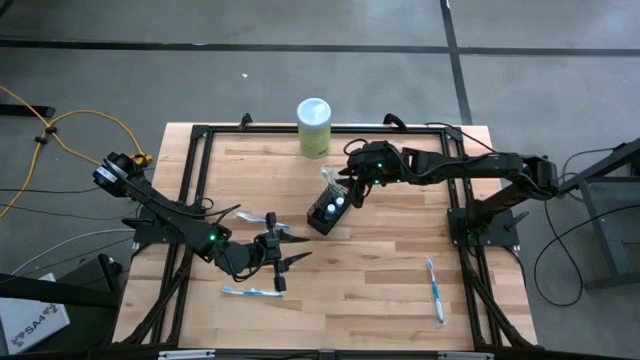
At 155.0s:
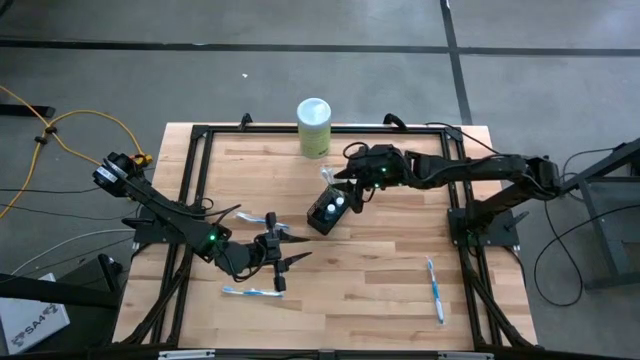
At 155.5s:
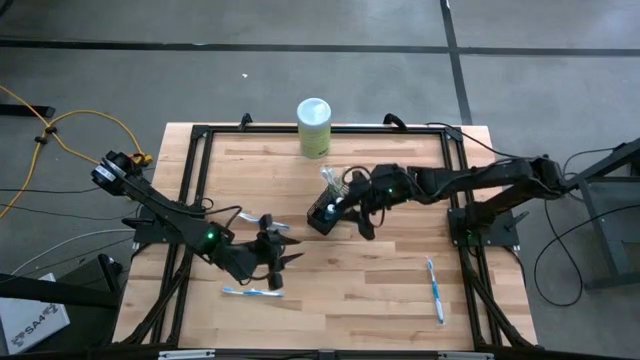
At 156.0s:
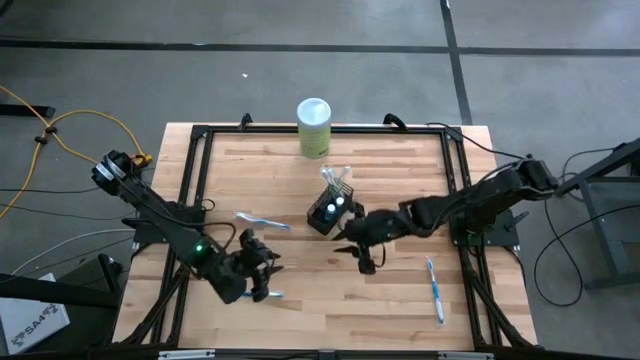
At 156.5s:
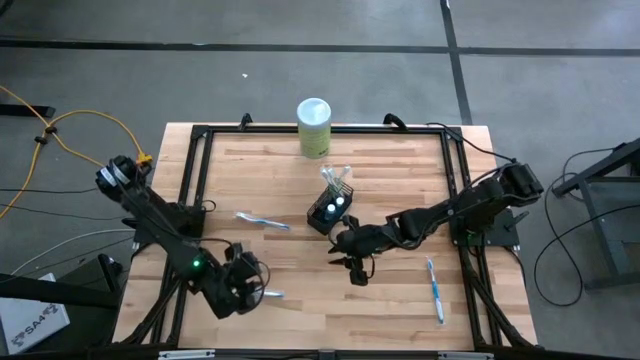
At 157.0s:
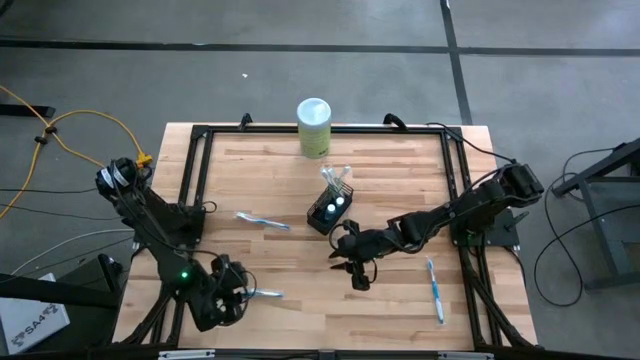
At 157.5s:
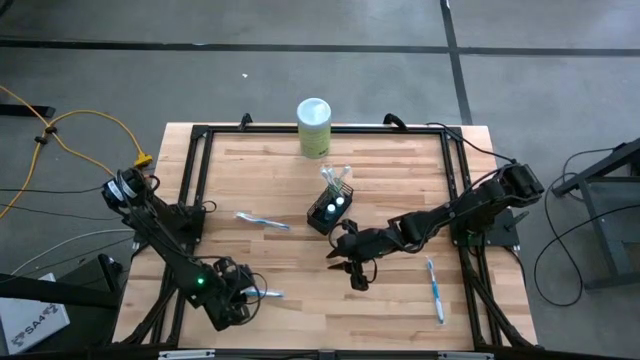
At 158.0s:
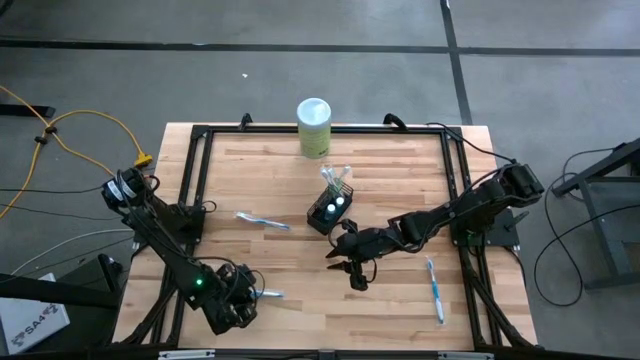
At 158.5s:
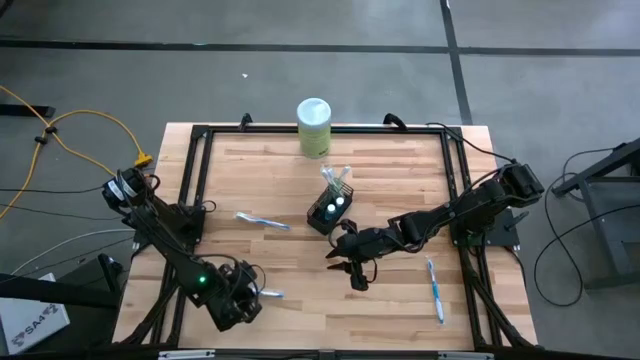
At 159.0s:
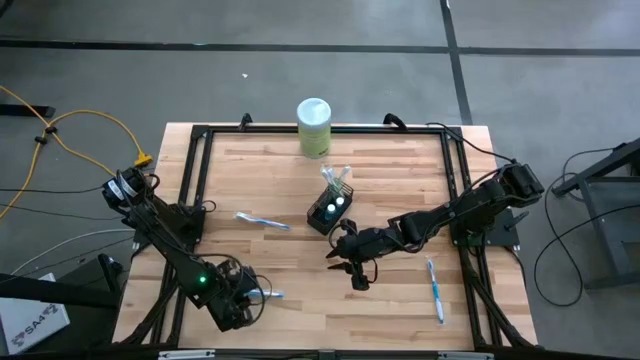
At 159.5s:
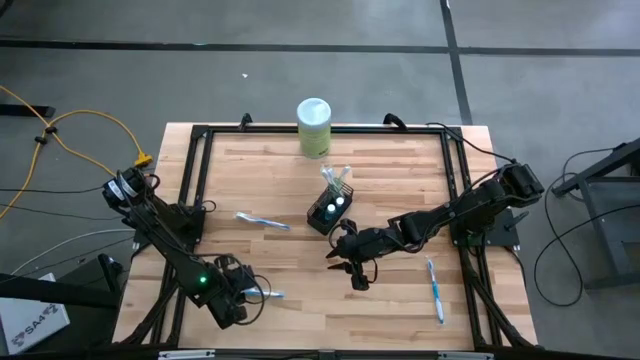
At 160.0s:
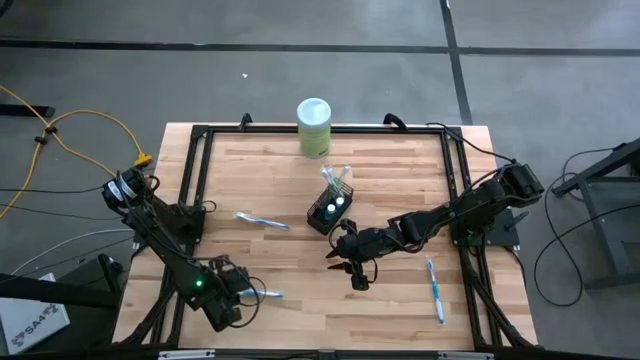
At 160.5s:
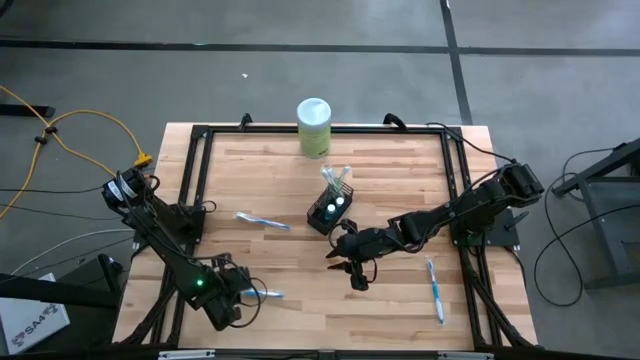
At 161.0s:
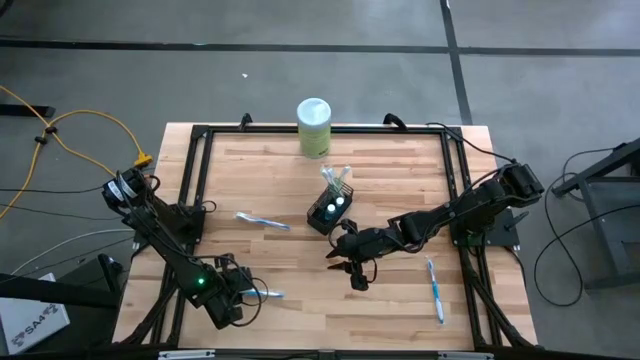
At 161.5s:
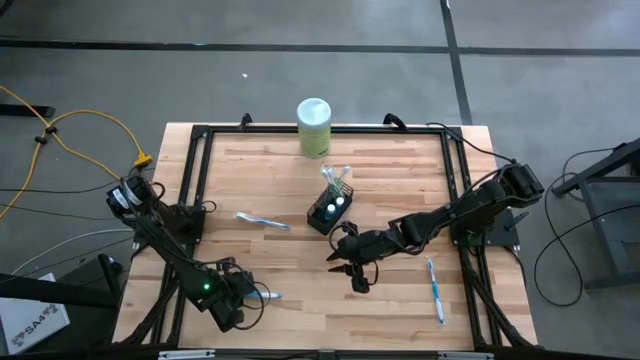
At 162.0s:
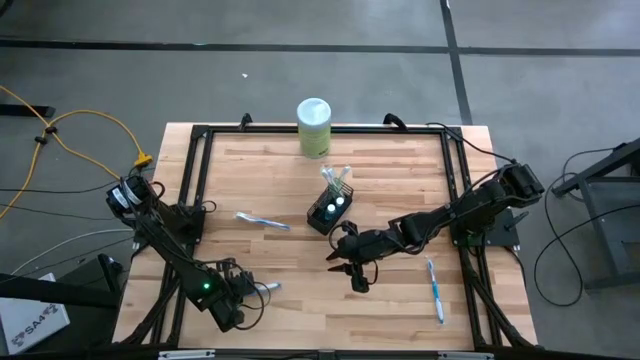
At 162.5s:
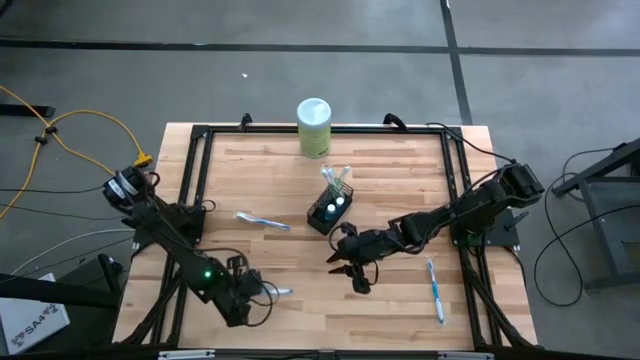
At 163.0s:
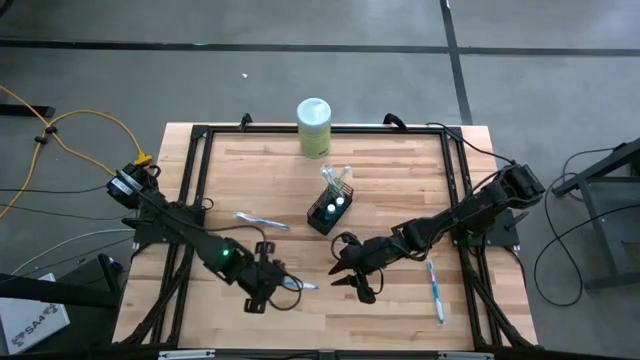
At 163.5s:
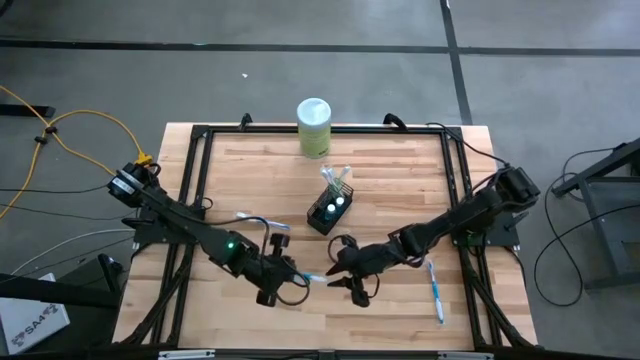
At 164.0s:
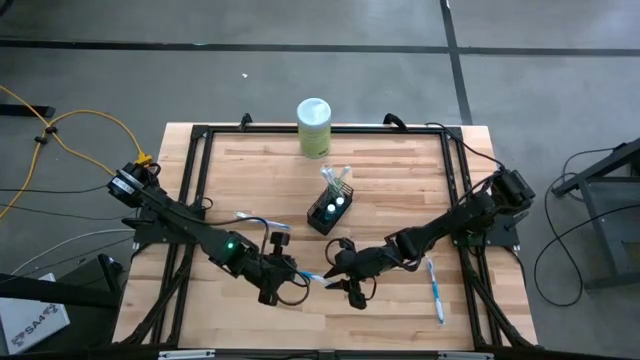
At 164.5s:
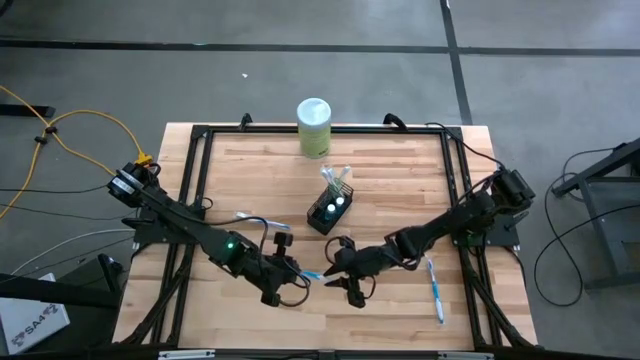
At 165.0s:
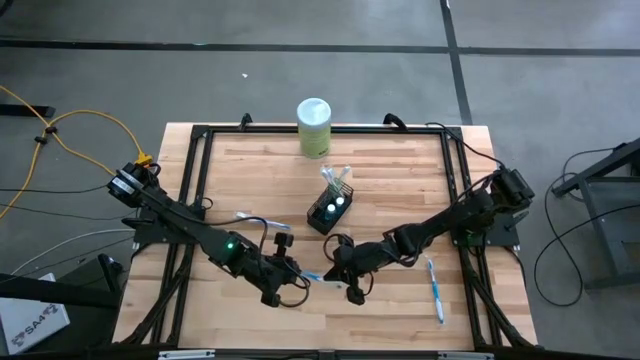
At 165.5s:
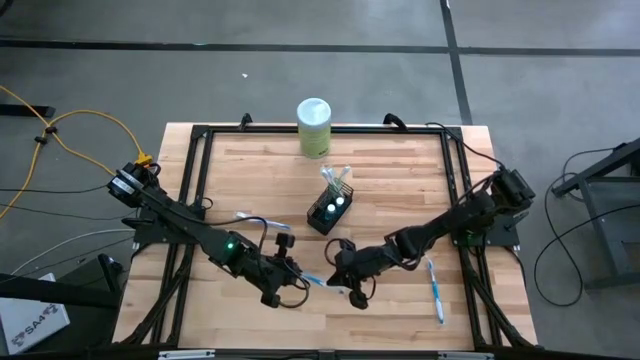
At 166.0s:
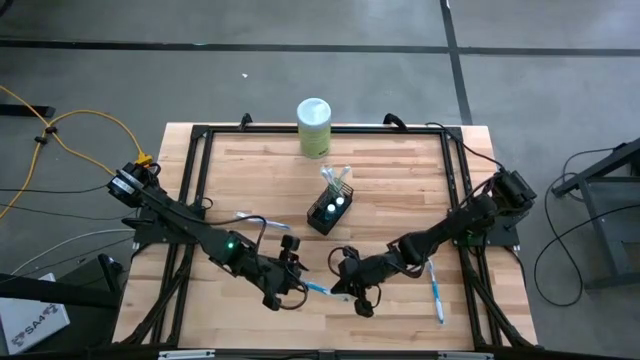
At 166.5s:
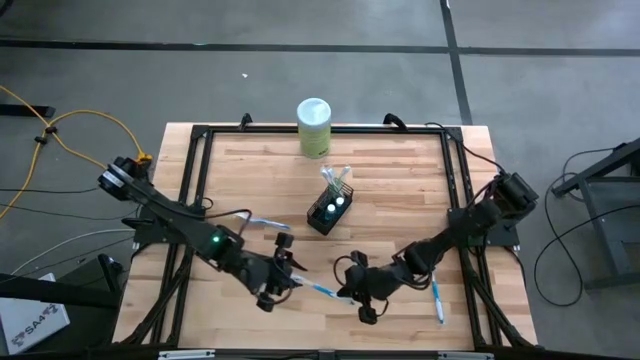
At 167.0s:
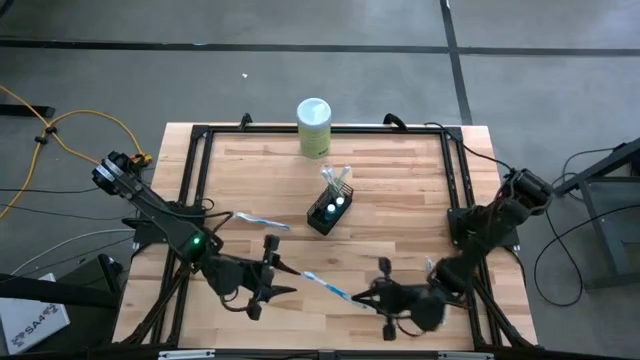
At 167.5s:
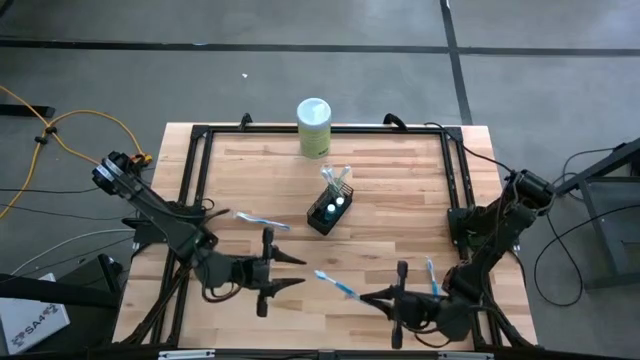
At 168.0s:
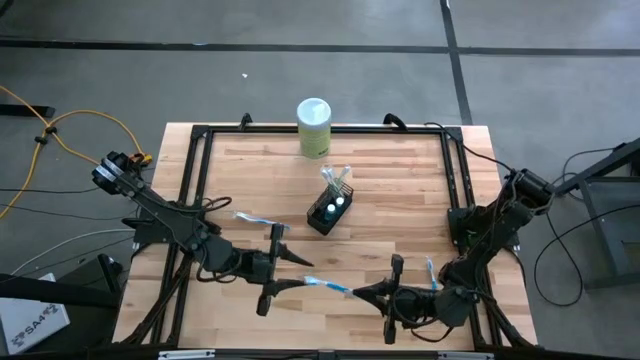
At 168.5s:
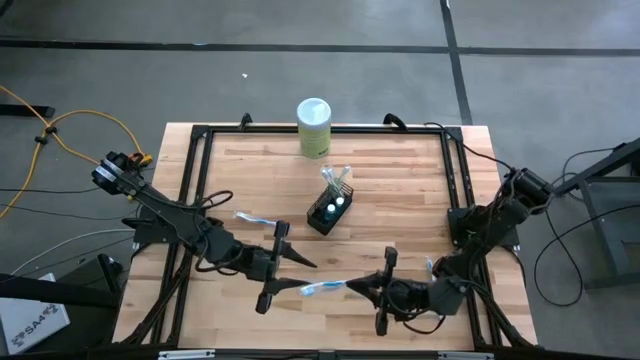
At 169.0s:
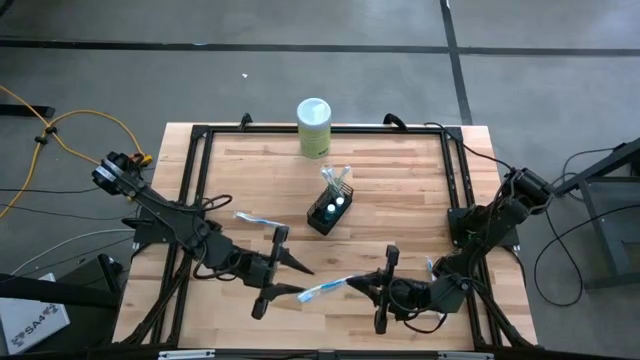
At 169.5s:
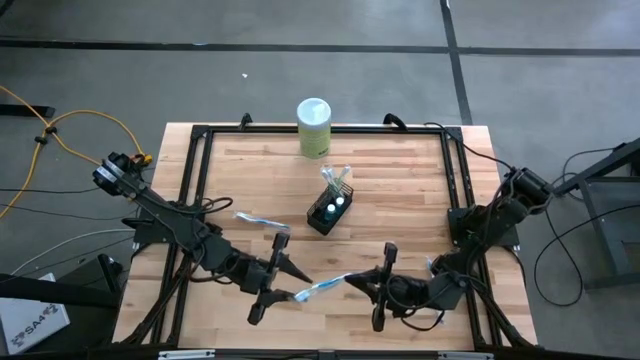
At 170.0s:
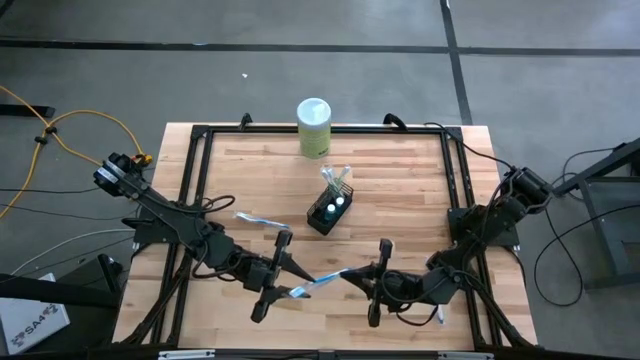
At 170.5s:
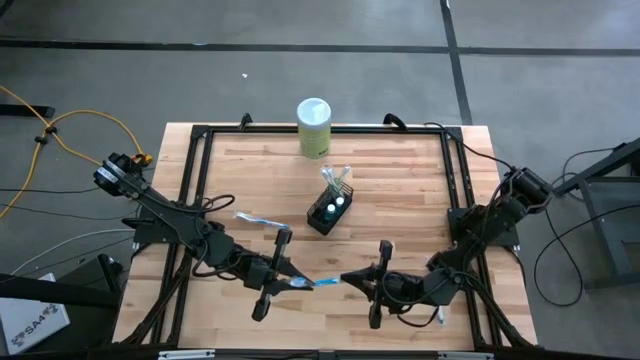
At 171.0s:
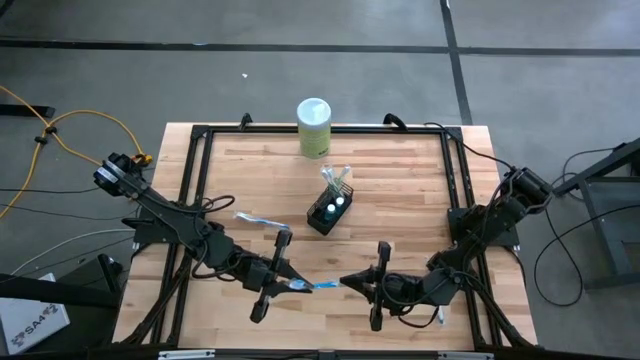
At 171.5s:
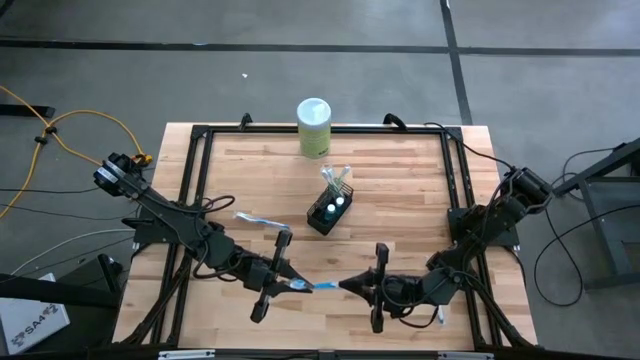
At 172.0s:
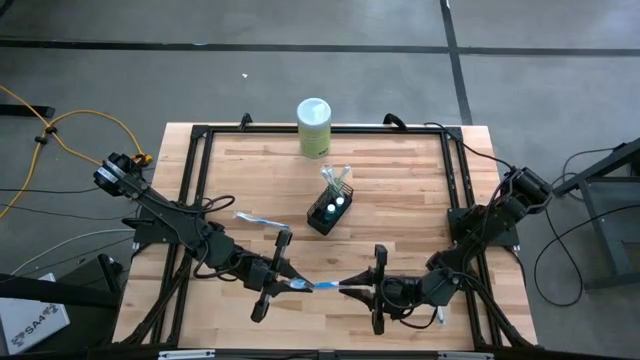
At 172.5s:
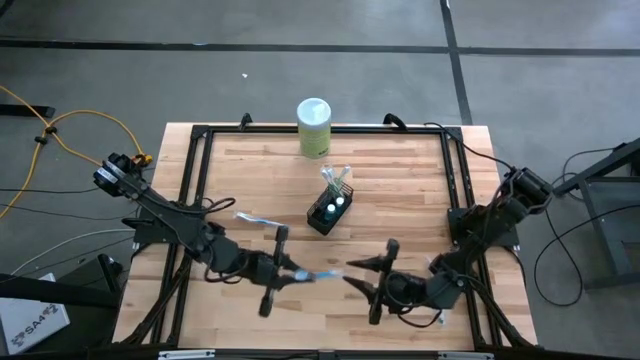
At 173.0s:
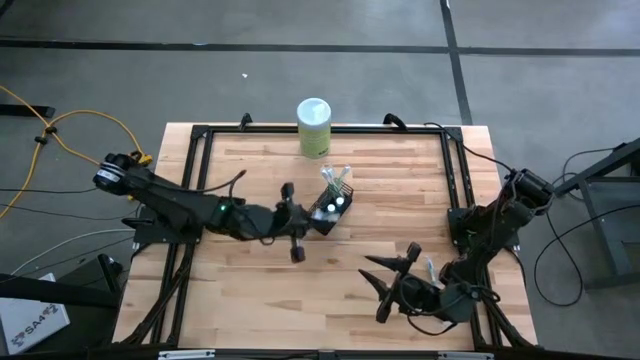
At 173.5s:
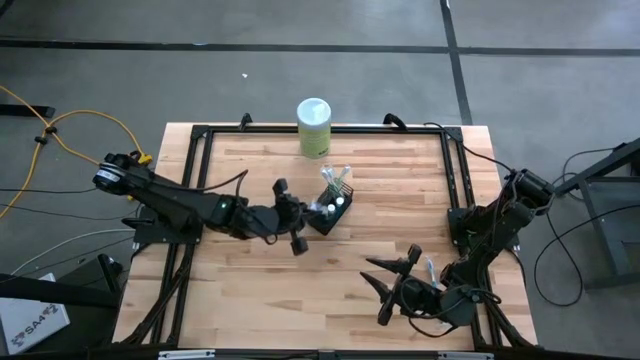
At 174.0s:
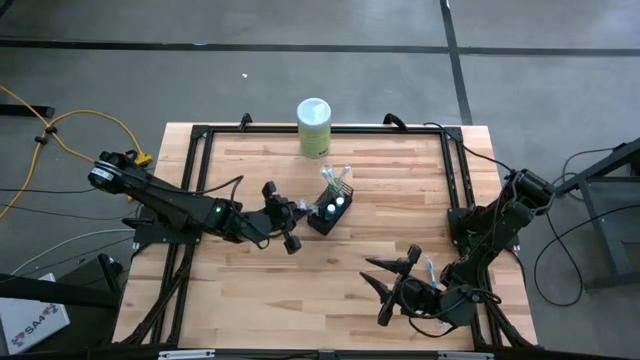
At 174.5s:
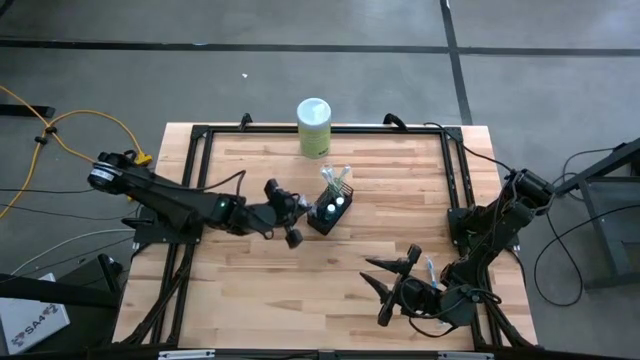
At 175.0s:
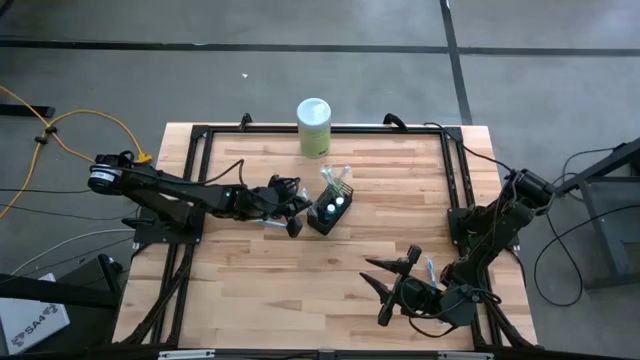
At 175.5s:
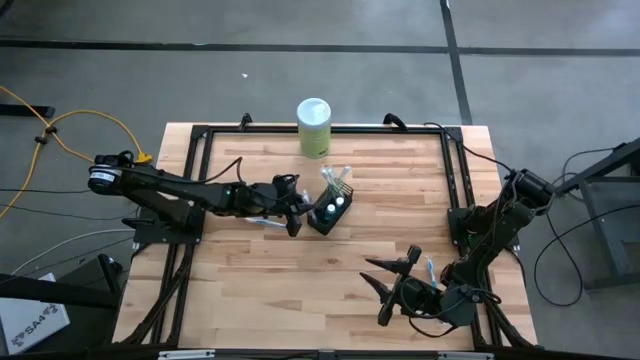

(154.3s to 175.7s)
Task: Pick & Place toothbrushing station
Put the bottom left blue toothbrush into the left section of the black wire organizer
